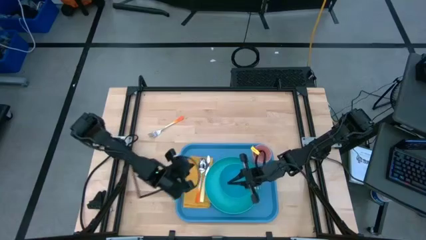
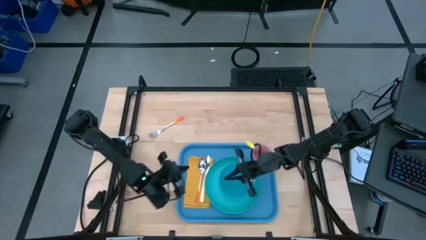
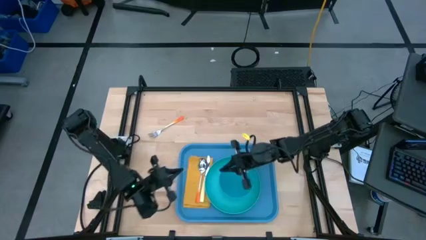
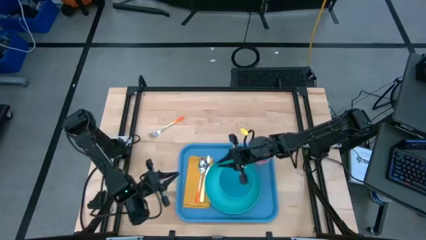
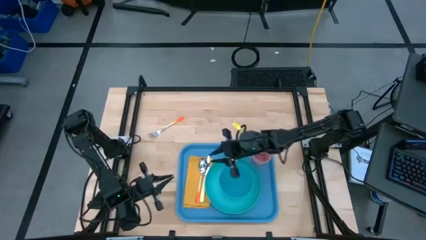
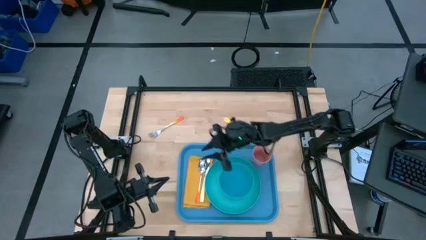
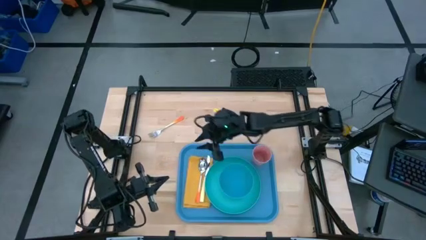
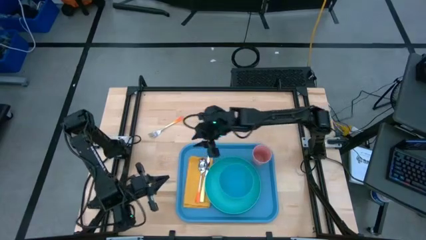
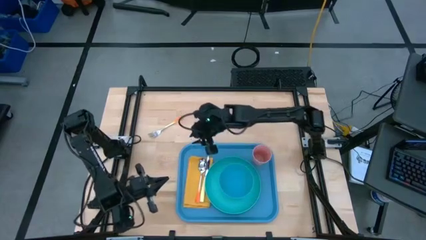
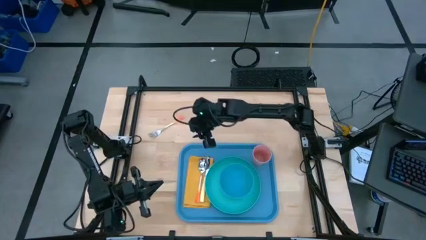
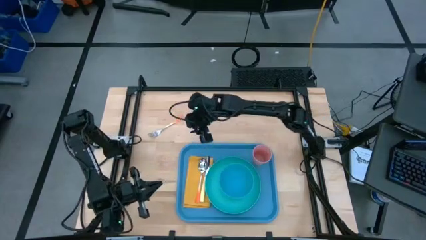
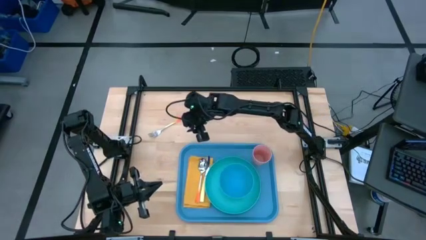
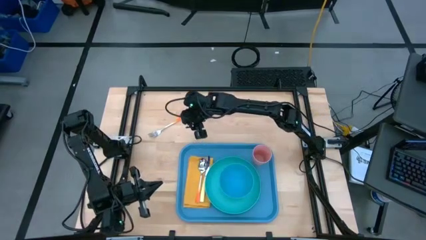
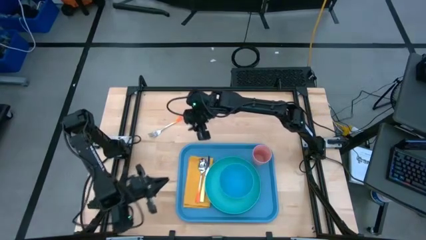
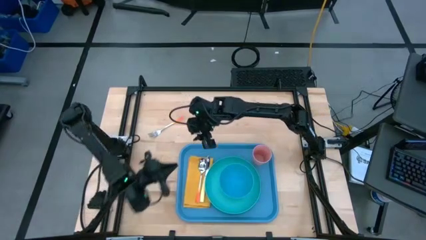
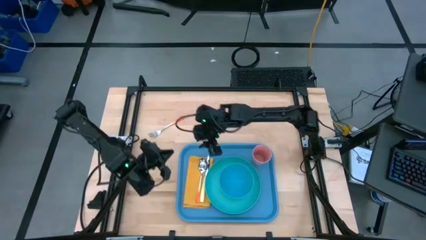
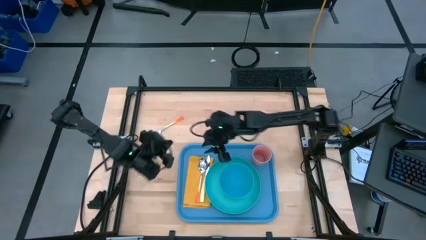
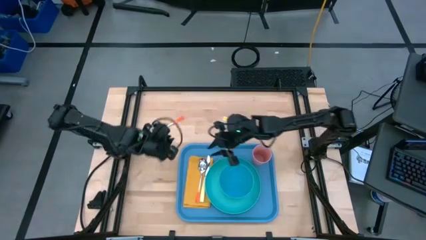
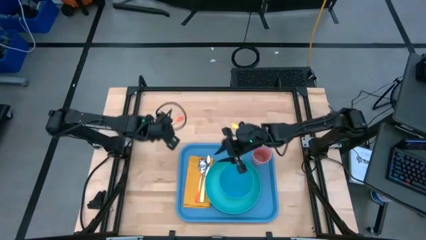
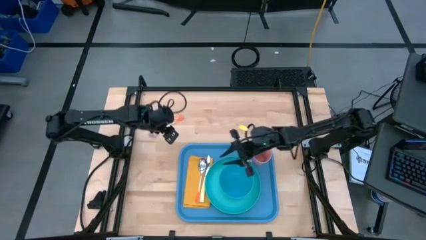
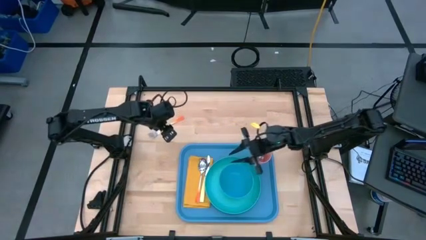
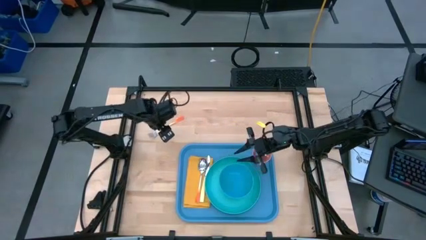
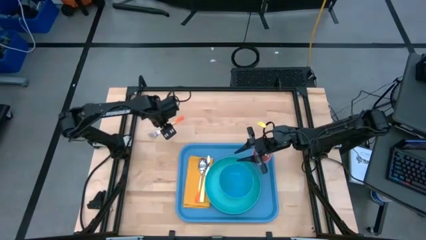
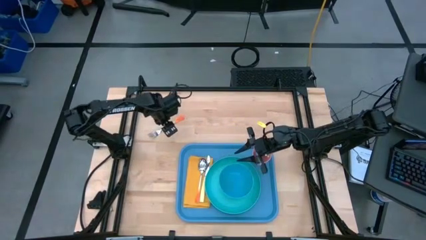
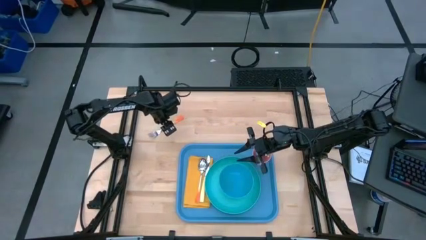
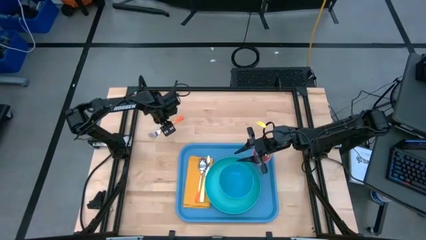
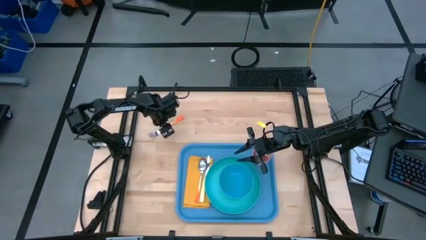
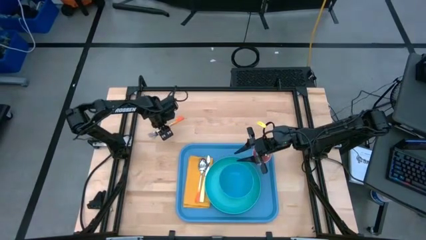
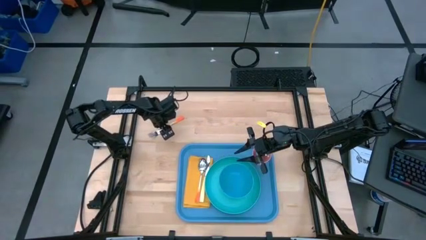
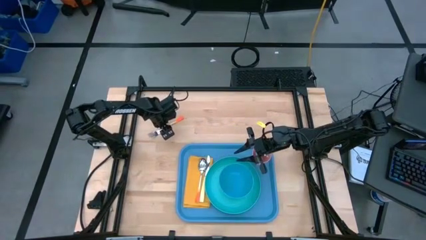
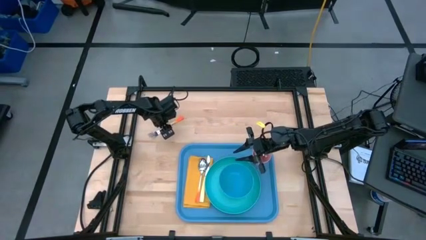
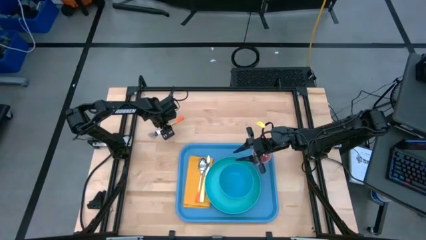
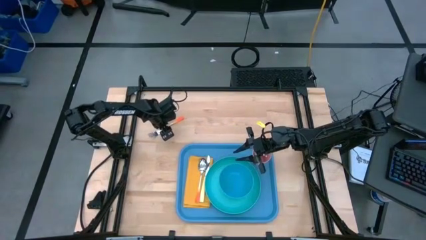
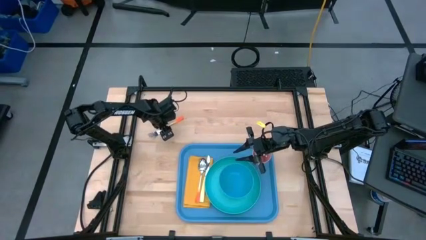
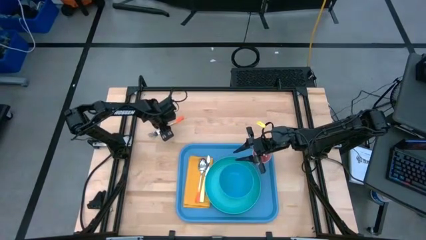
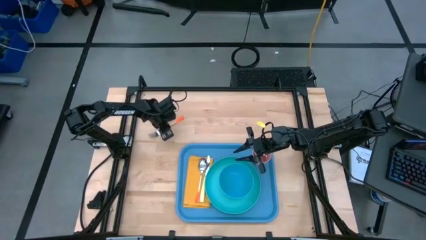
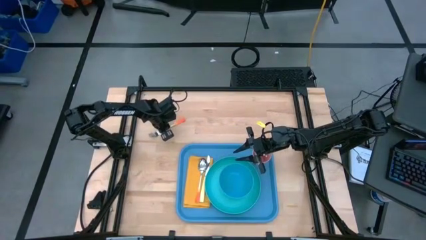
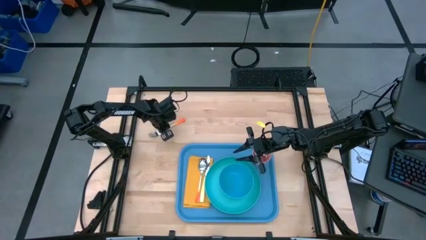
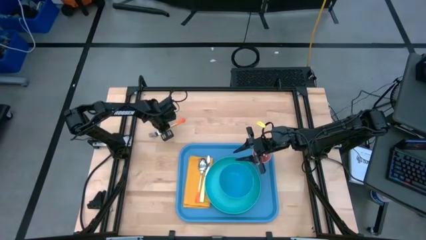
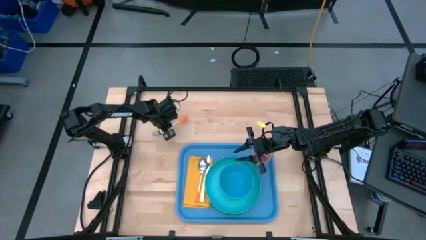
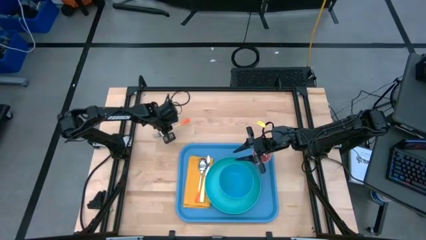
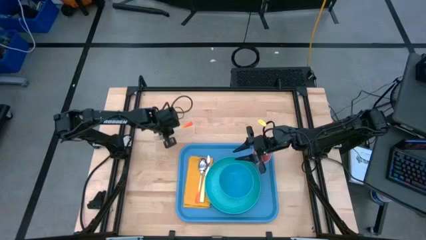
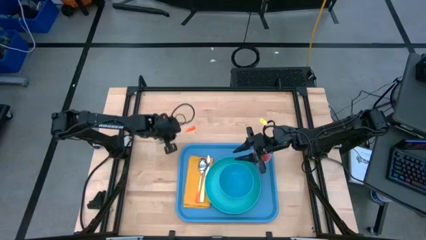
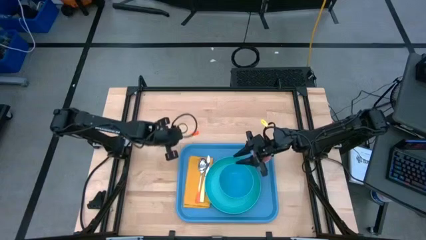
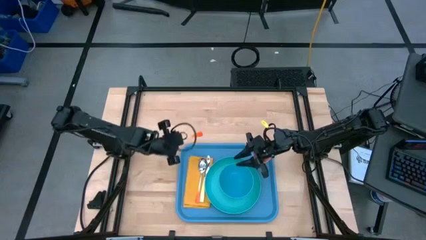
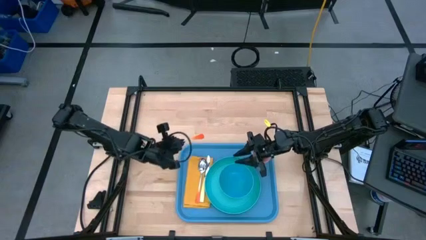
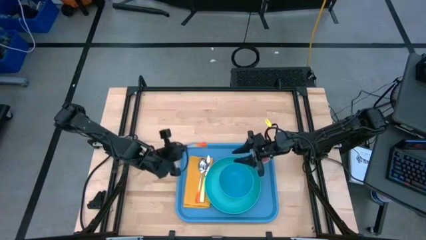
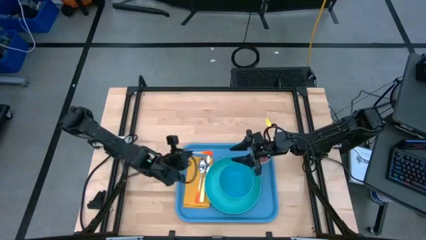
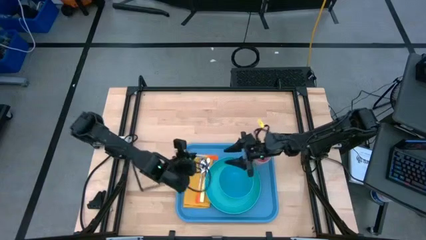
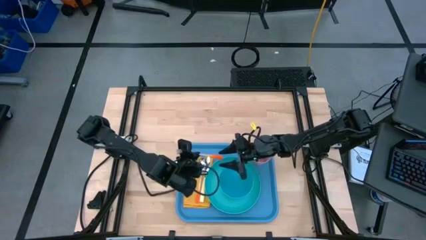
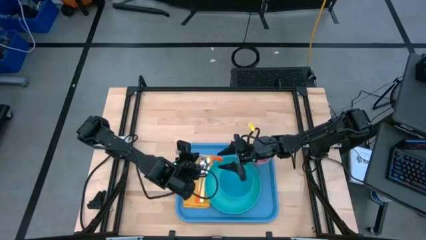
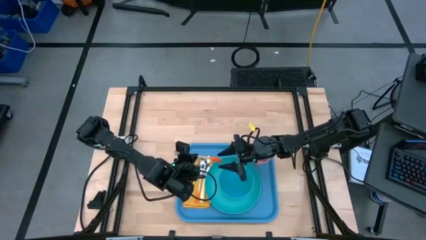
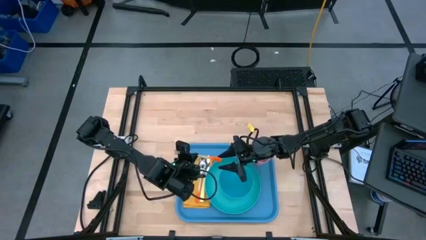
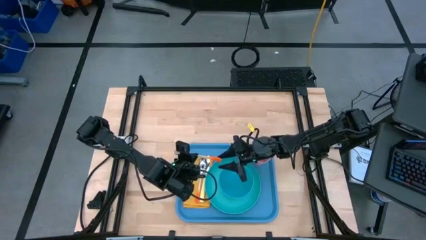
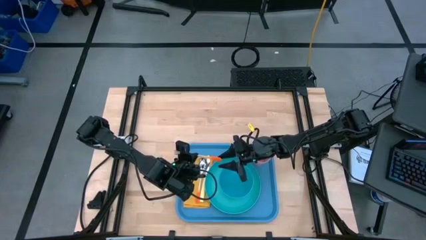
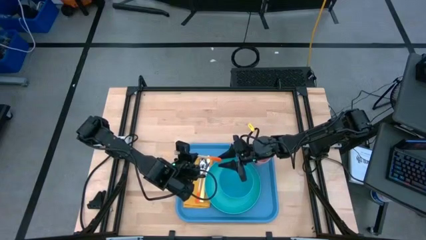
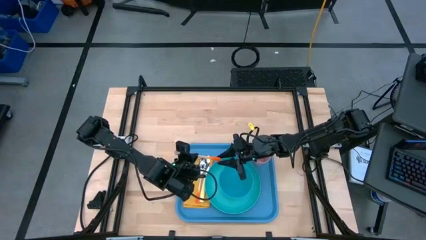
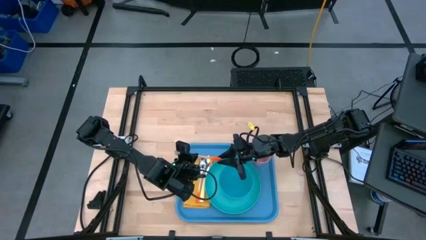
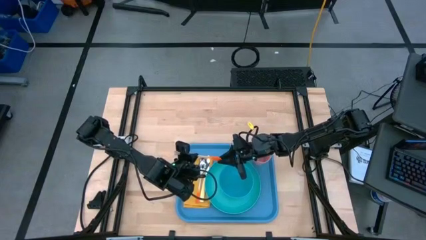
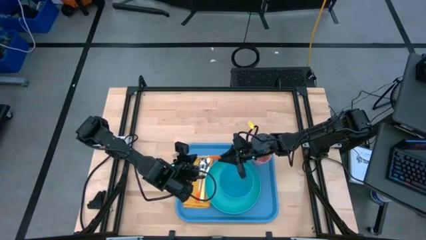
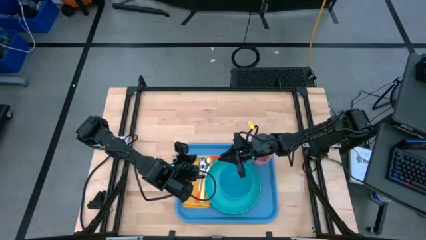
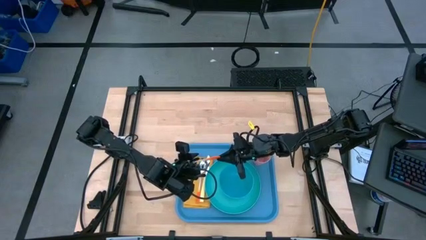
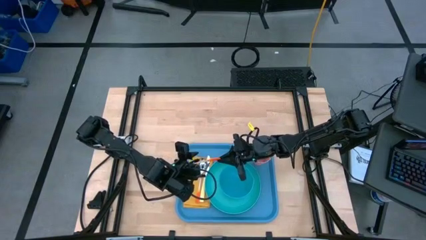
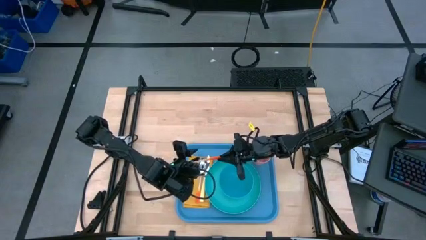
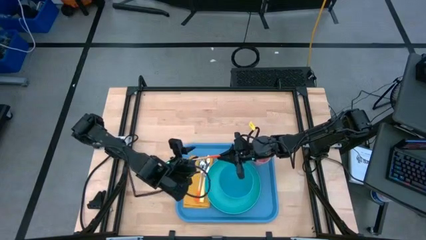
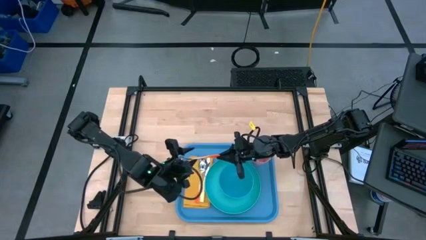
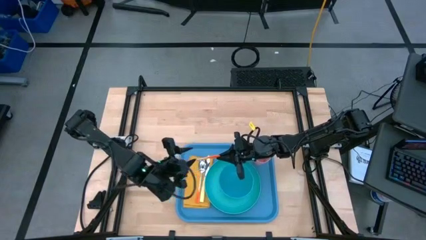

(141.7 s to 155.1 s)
Task: Set up tray
Put the orange fork on top of the yellow napkin to the left of the orange spoon

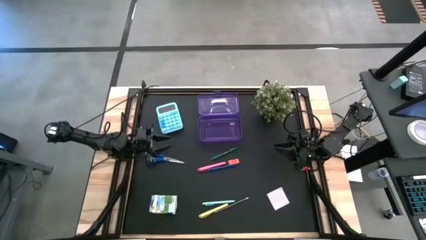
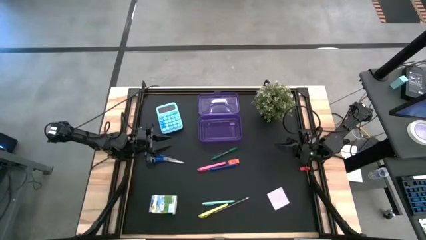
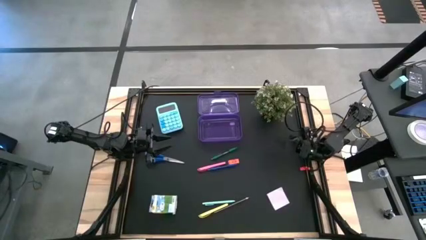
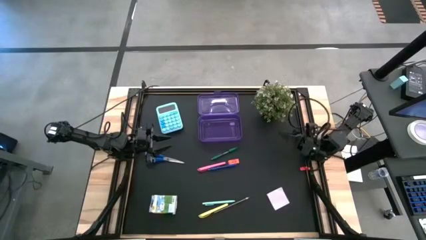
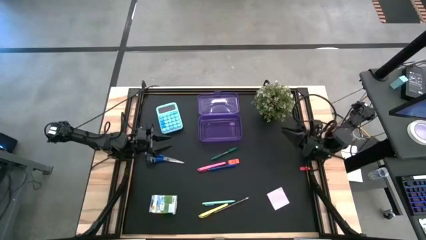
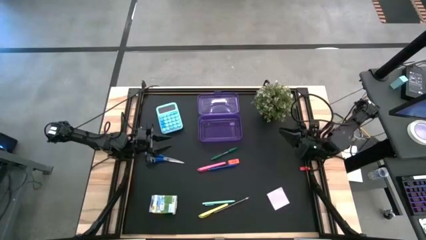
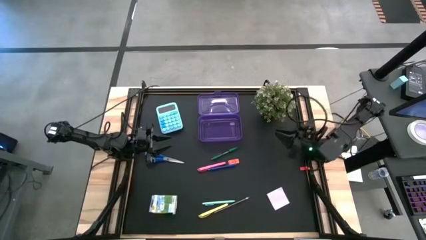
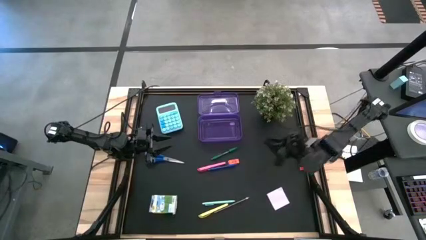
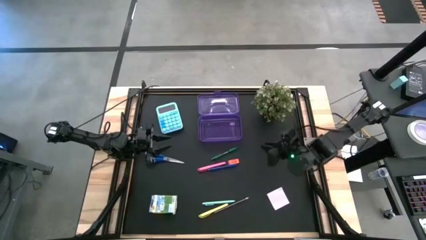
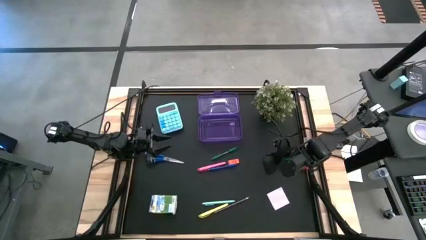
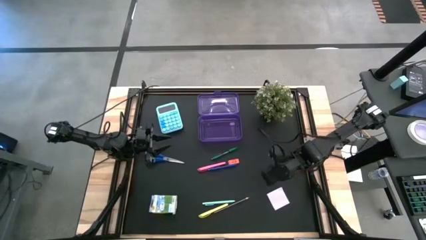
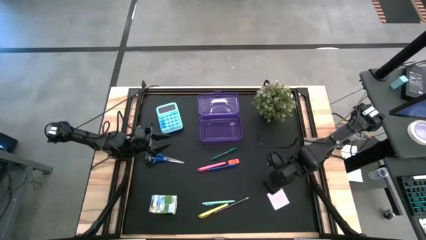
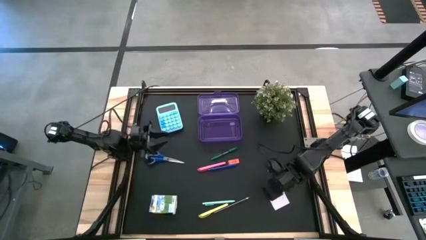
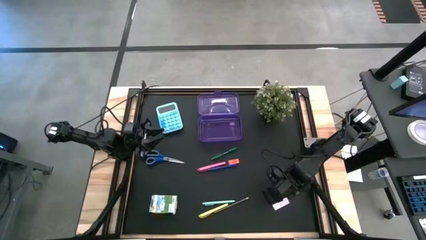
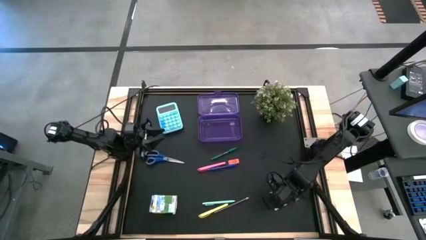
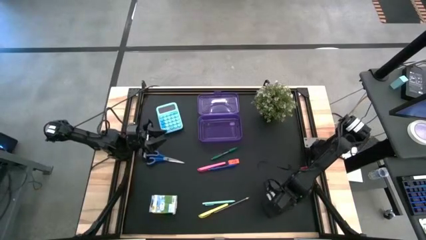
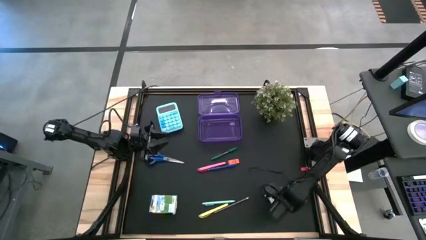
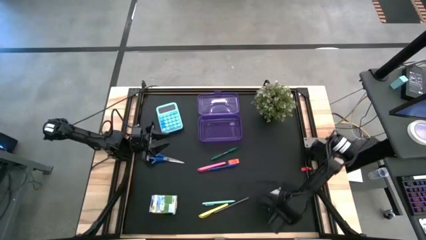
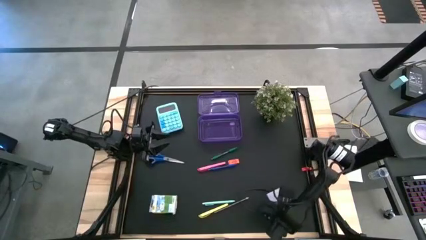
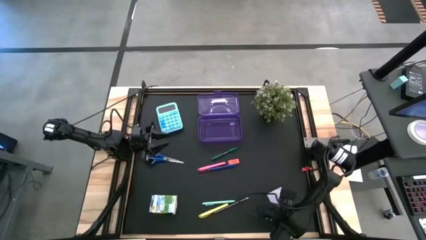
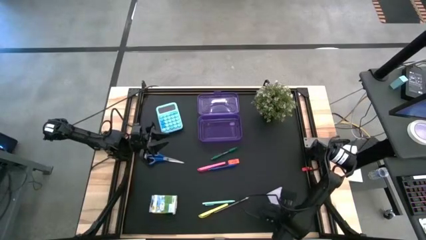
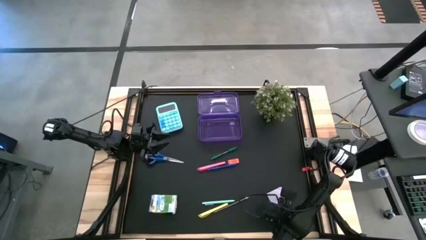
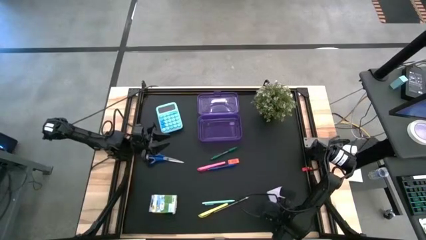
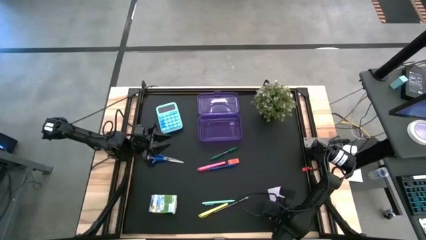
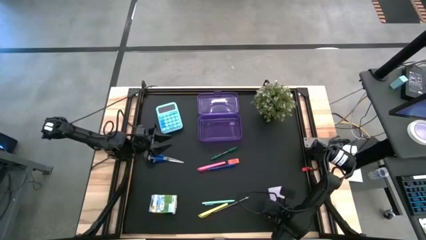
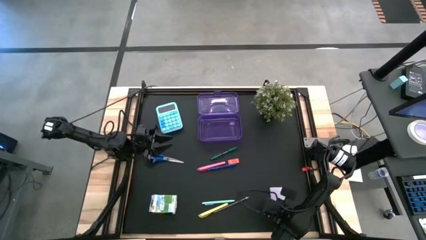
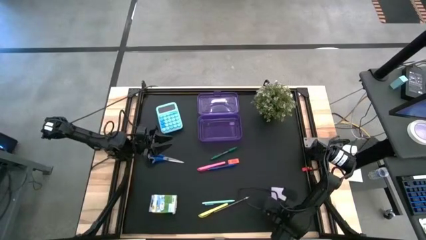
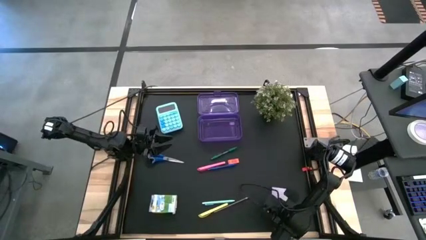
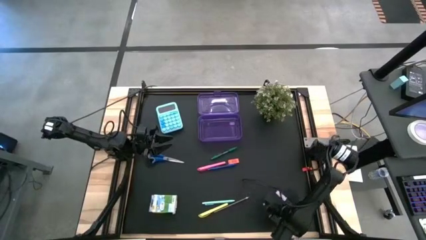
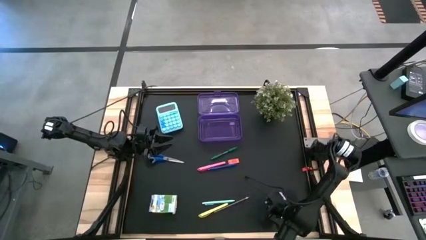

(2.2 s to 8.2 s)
Task: Pack school essentials
Put the white sticky note into the purple supply box
